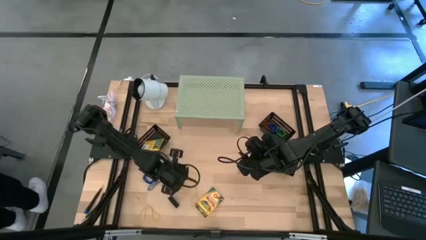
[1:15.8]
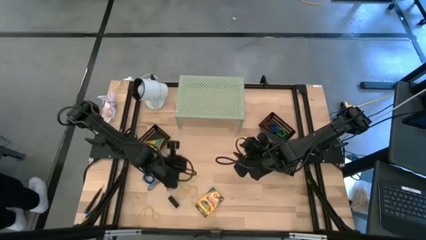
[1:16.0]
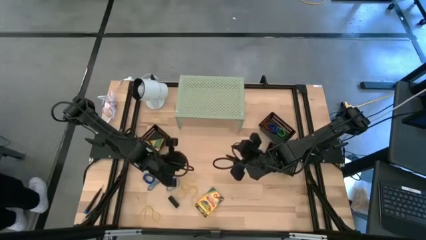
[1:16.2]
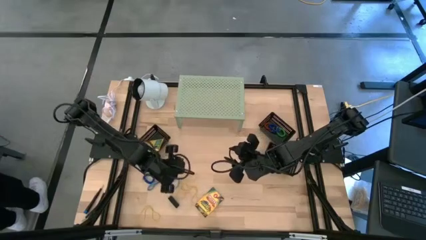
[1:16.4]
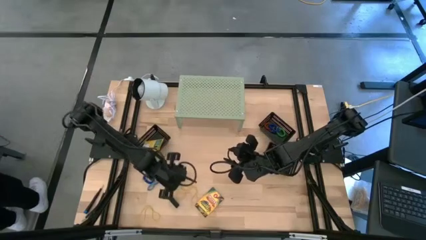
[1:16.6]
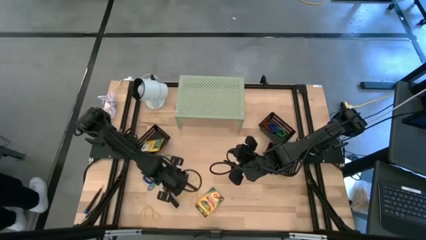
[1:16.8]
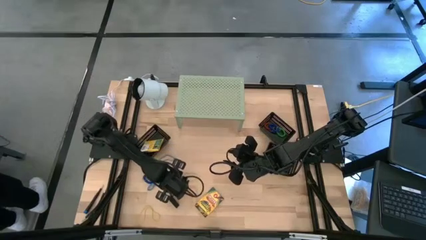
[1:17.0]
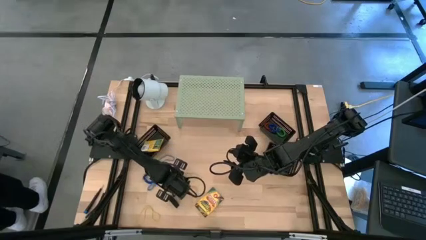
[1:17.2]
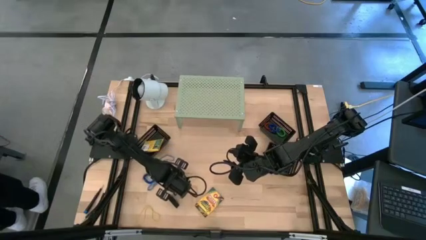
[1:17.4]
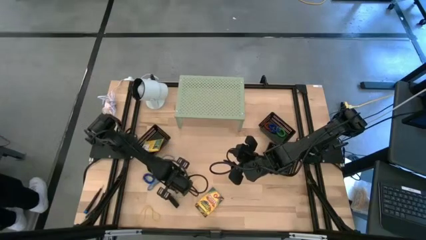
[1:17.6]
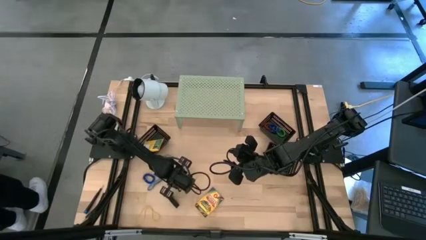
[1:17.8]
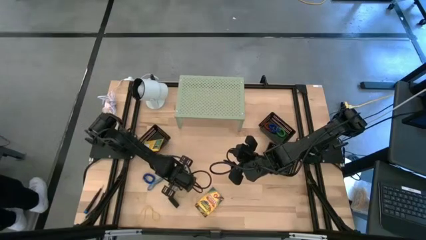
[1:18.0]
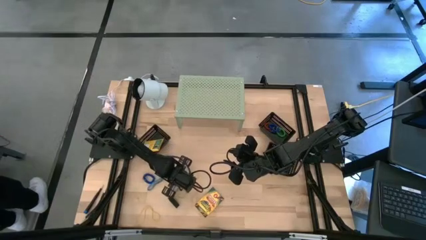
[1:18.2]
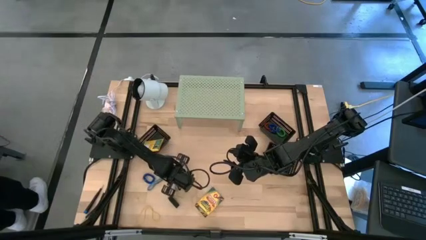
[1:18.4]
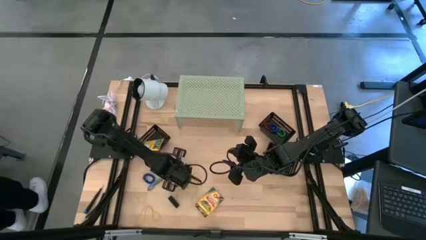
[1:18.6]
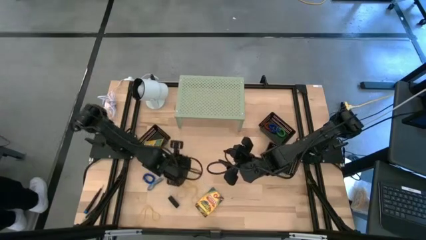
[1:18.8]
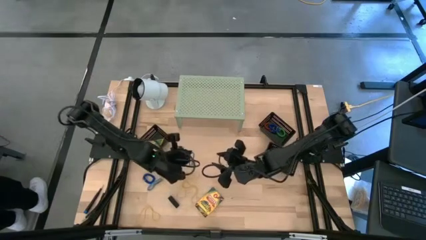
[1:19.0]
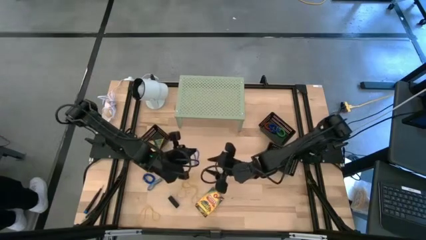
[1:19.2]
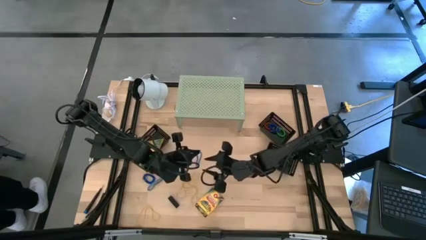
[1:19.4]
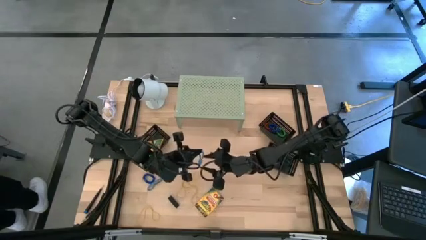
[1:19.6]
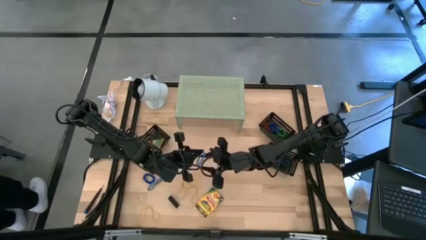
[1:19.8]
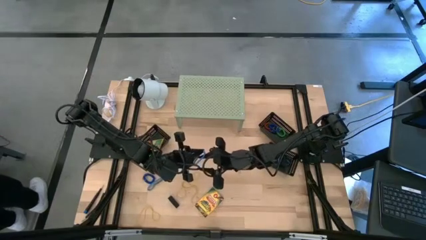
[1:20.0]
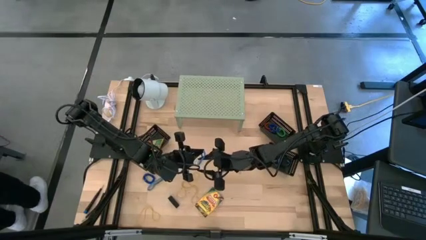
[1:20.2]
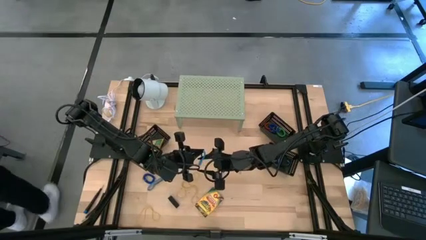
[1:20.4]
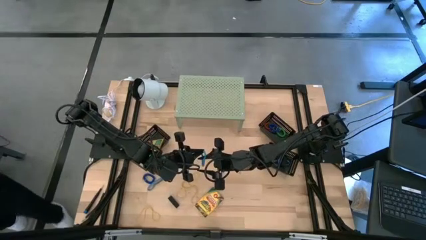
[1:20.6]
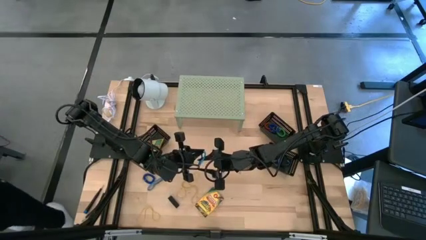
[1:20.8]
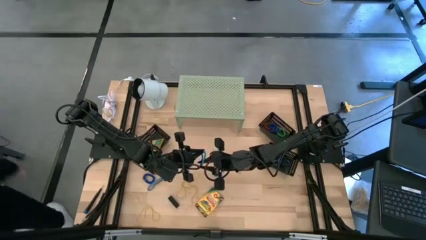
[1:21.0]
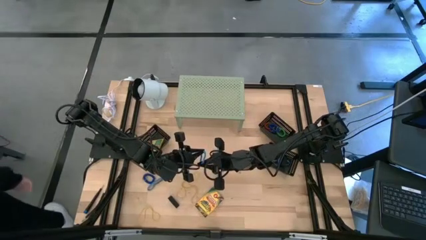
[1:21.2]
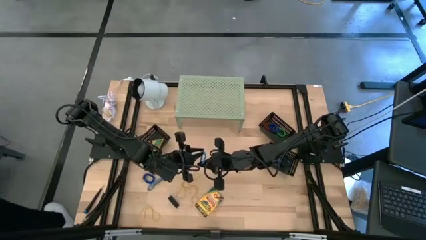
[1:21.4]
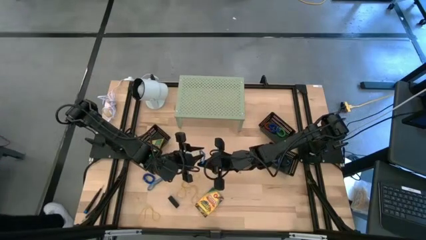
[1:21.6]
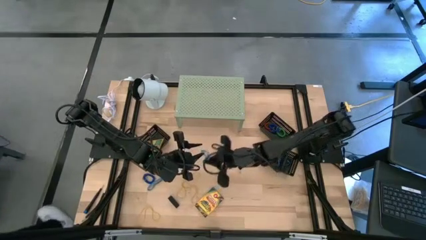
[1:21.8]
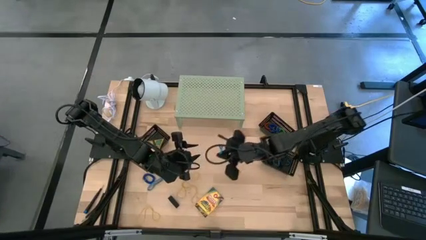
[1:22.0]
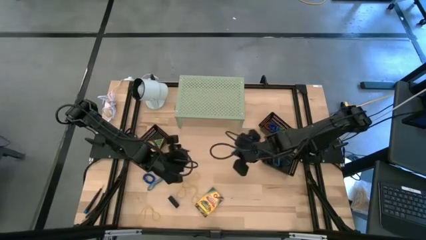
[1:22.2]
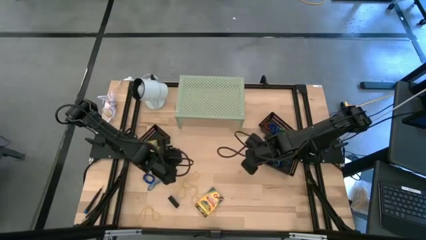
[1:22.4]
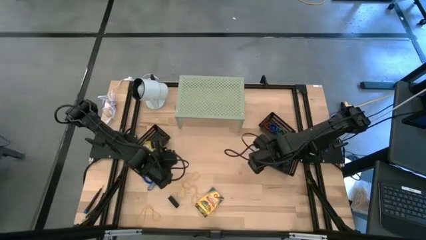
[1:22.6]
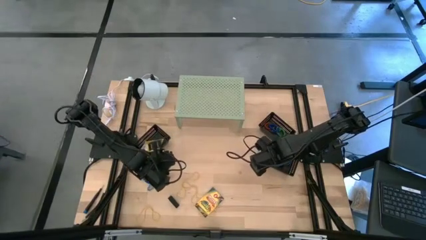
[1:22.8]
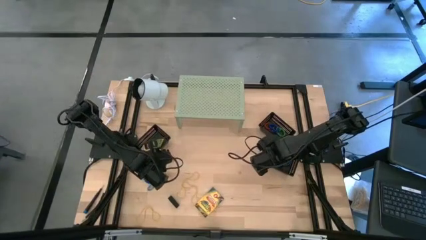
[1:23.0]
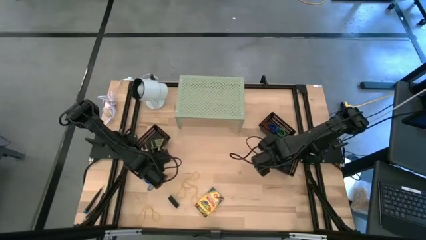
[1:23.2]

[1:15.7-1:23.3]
Task: Pick & Place Office Desk Supplies
Put the blue rubber band into the bottom right black bin

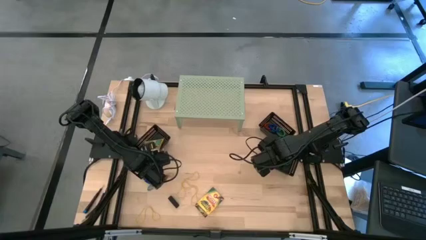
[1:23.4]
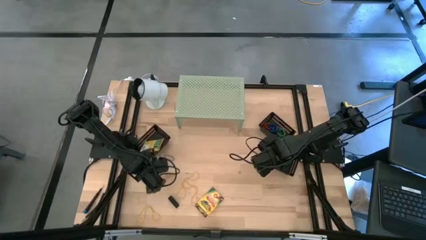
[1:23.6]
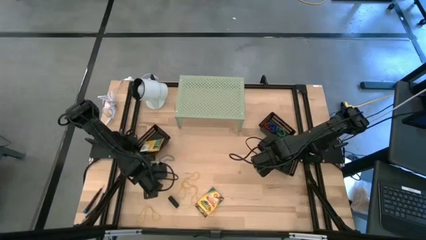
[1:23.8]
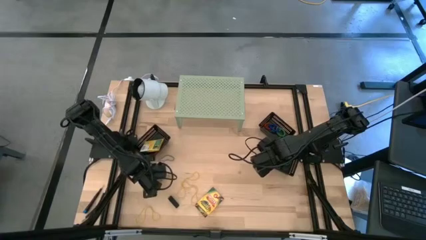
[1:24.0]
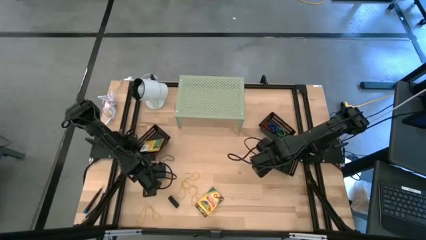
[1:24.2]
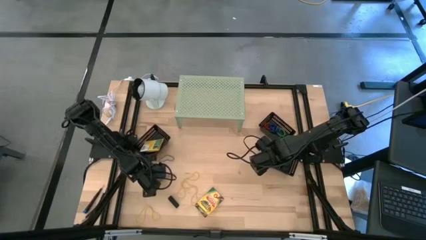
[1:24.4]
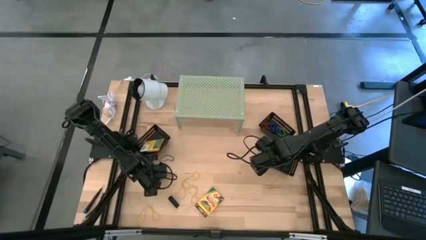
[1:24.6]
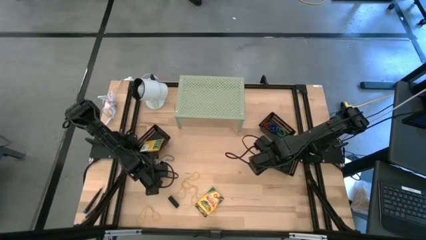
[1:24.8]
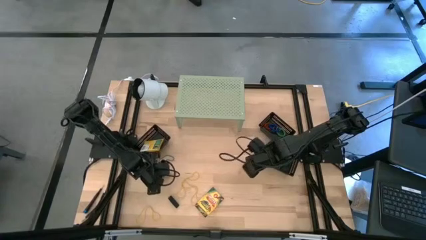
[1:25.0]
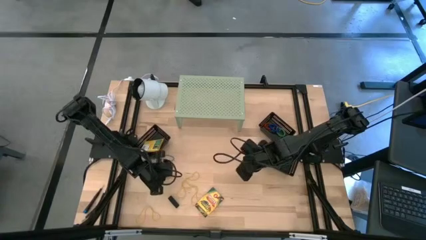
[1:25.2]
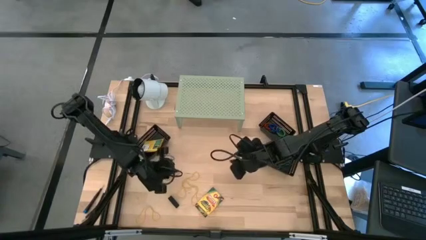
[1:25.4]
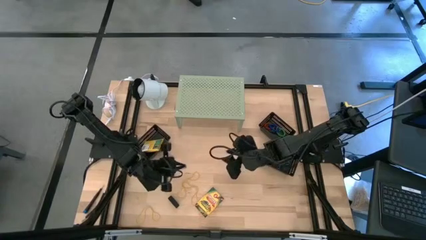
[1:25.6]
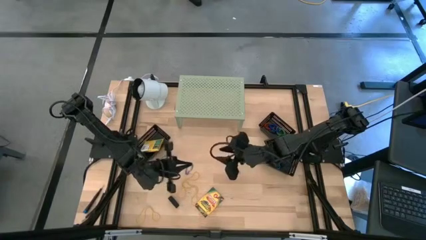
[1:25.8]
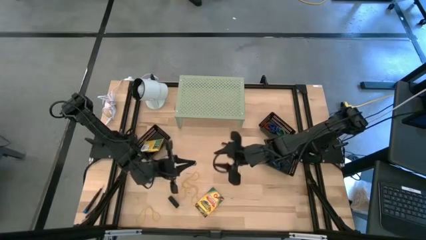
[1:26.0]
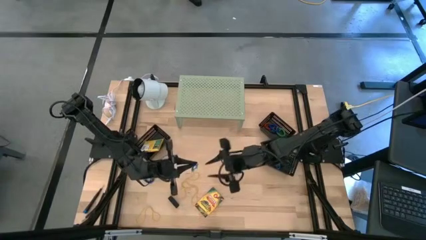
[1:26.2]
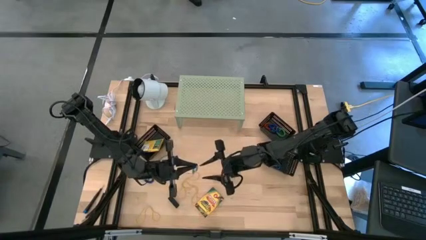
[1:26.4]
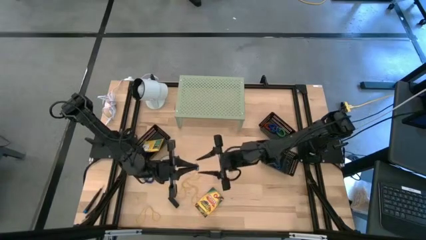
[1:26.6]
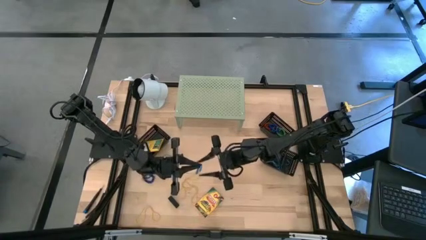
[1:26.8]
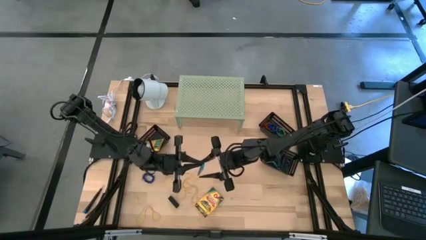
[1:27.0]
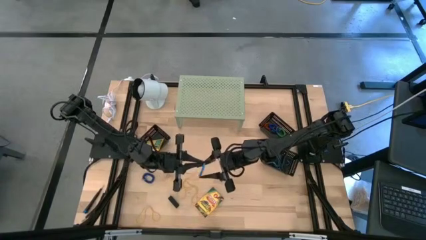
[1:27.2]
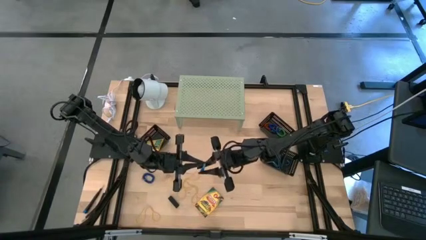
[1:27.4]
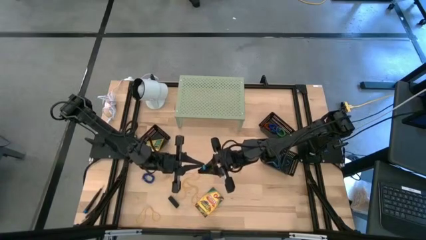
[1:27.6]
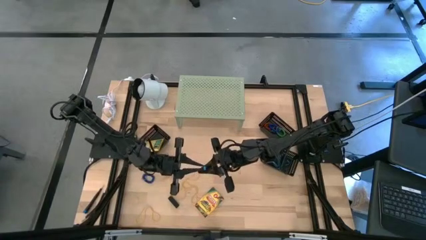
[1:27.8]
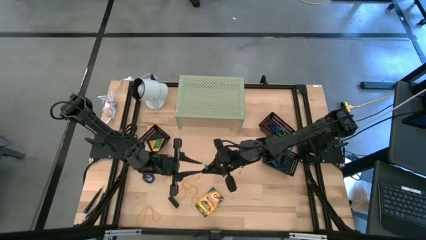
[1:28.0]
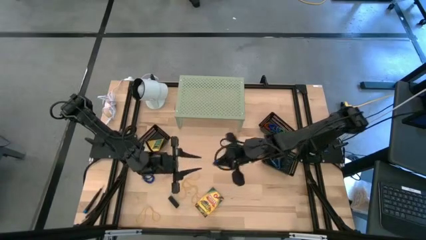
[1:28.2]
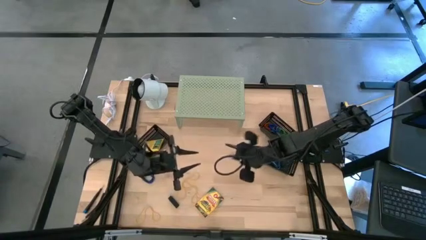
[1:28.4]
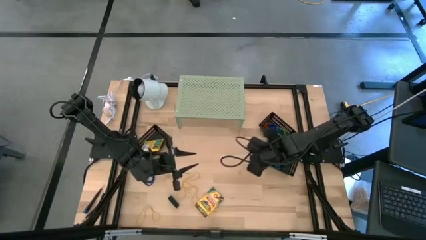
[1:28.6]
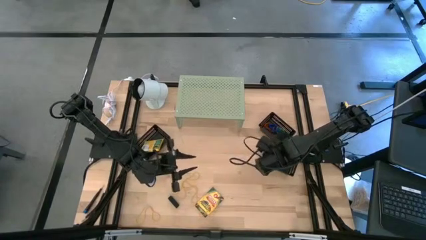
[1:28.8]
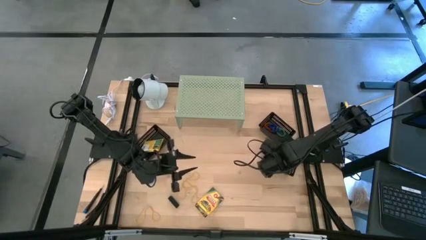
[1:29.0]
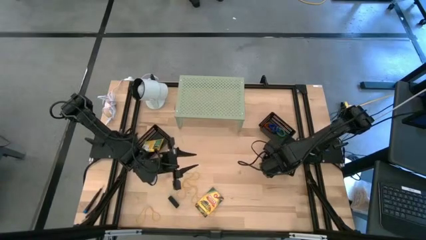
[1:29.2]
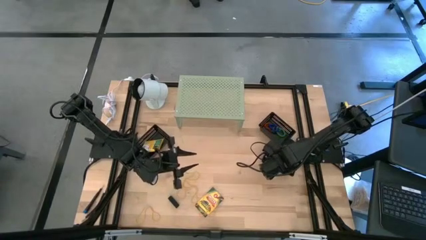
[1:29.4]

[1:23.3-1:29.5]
Put the blue rubber band into the bottom right black bin

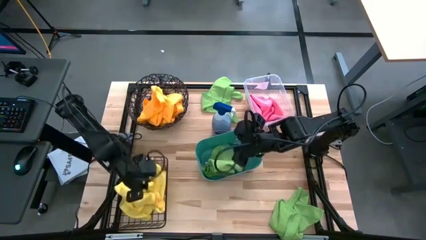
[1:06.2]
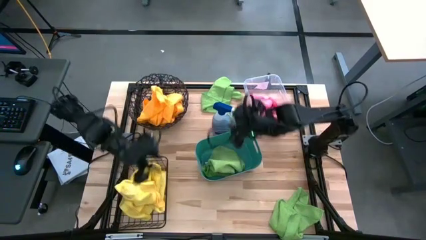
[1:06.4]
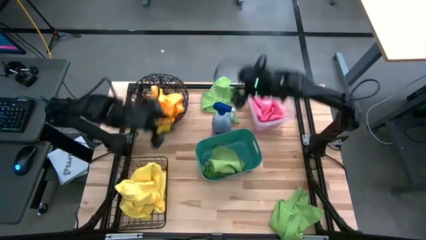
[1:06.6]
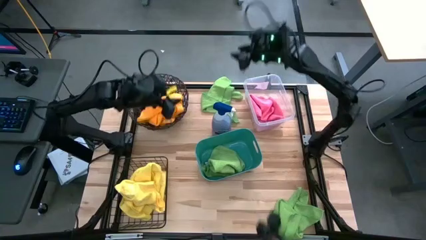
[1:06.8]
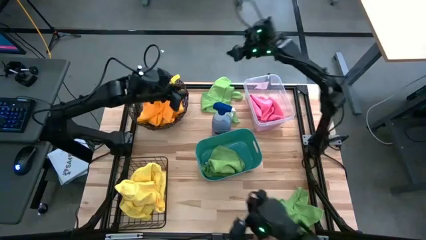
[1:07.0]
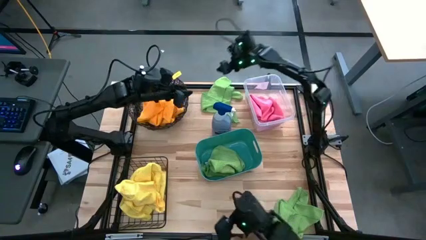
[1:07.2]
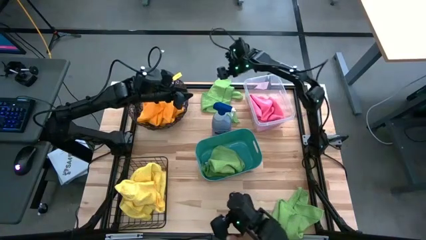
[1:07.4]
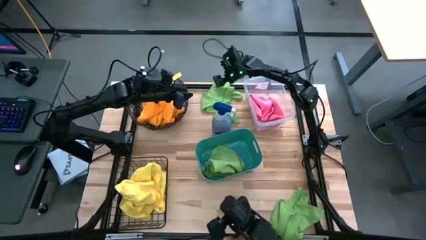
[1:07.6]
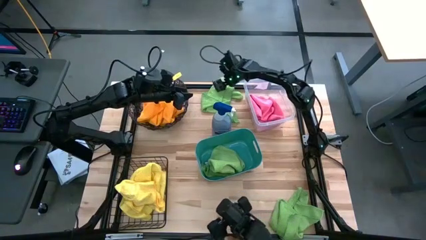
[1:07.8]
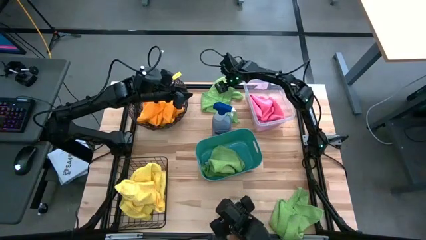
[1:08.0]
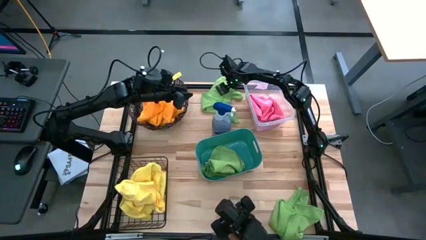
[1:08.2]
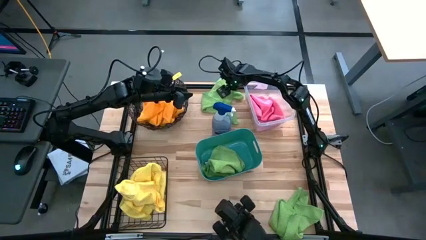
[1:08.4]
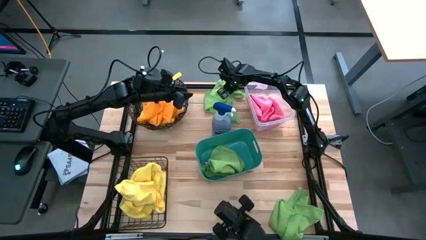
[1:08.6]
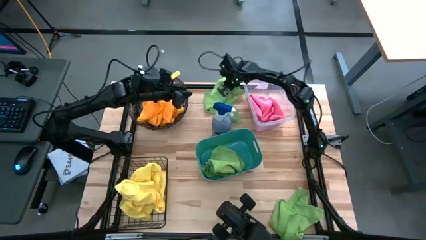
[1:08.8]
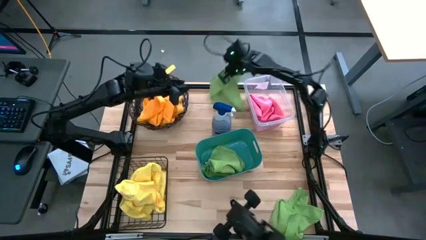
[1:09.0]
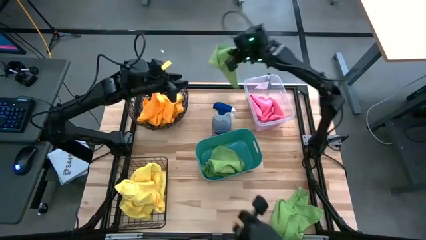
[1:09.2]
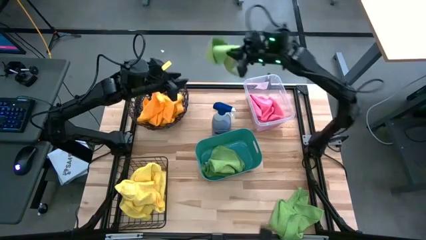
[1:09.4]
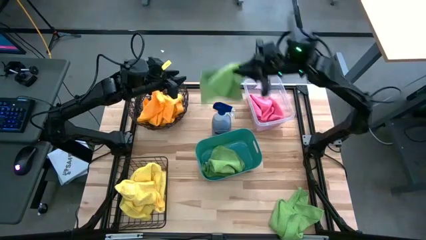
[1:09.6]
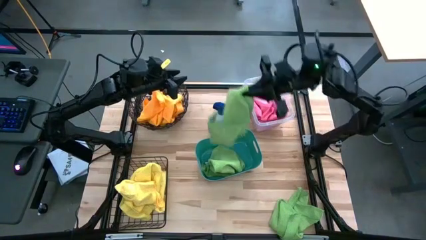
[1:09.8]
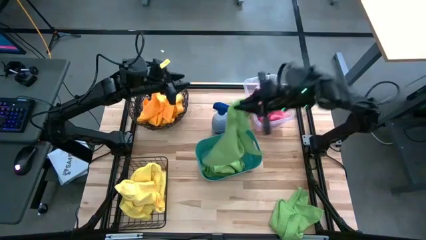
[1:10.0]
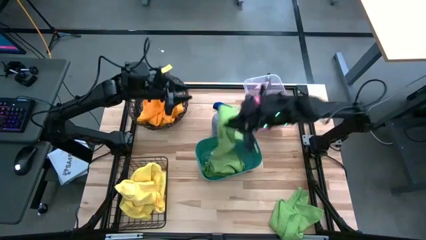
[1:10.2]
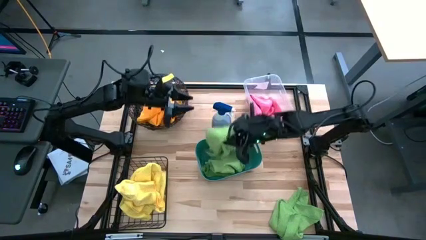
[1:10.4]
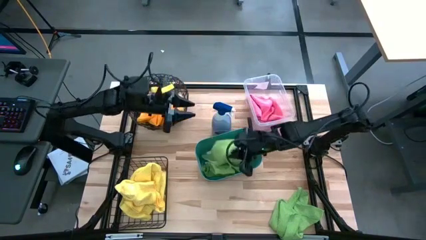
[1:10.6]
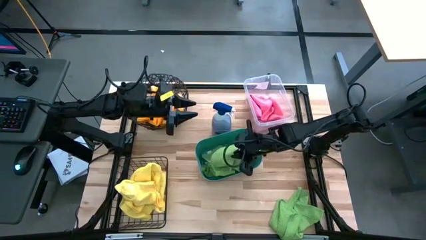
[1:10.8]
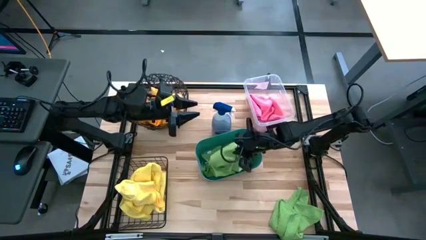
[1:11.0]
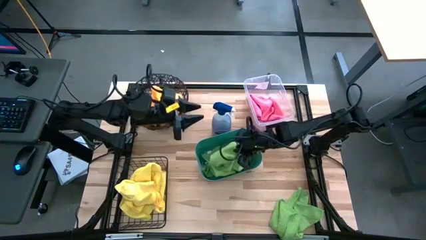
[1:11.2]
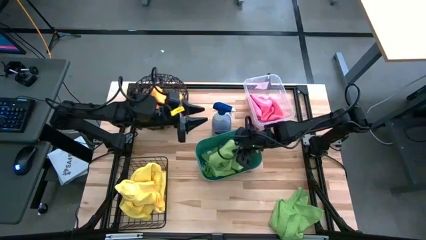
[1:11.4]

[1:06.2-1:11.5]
Task: Sort microfiber towel by color & place in baskets
Put the green towel into the green bin
